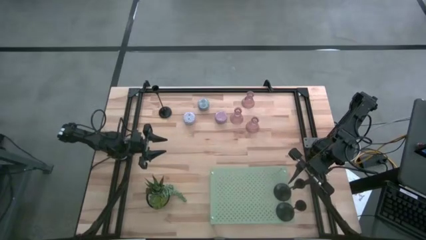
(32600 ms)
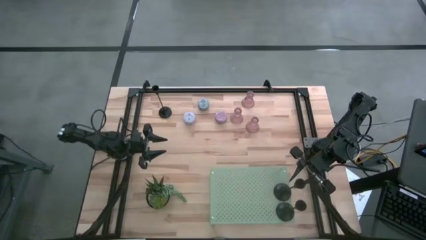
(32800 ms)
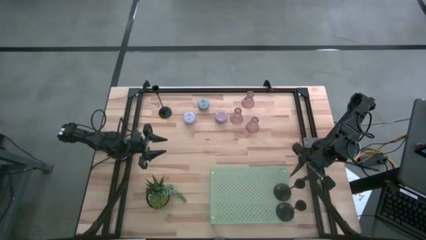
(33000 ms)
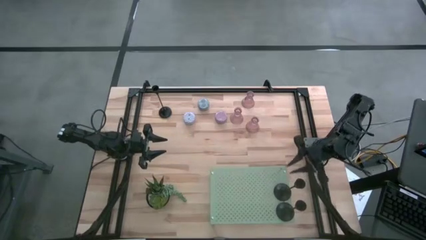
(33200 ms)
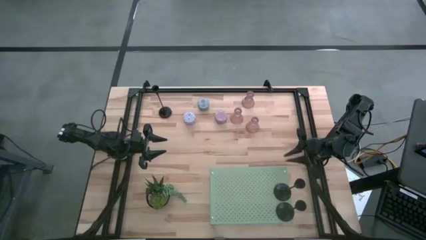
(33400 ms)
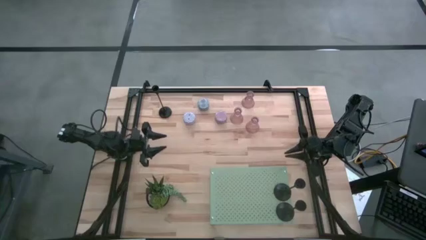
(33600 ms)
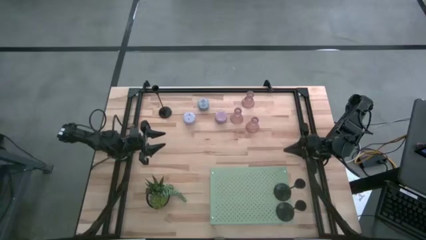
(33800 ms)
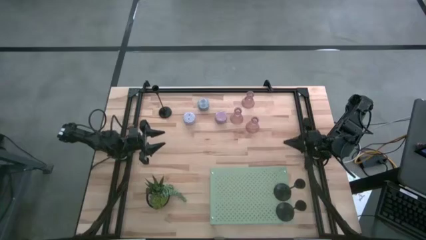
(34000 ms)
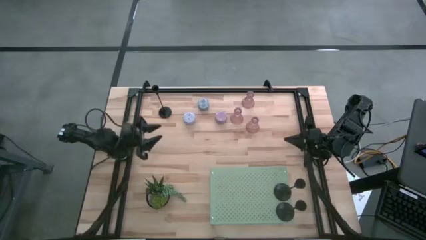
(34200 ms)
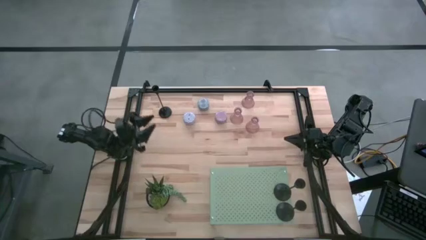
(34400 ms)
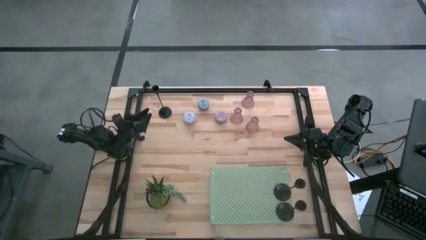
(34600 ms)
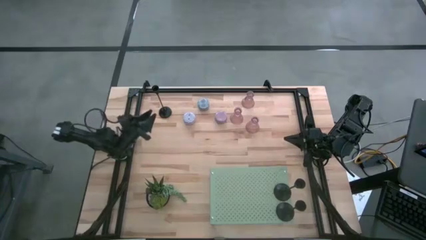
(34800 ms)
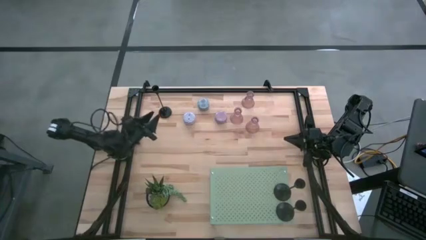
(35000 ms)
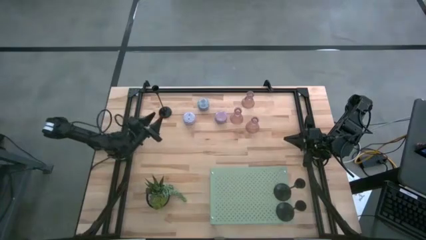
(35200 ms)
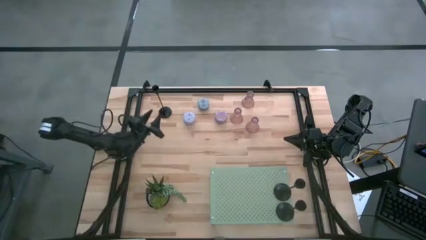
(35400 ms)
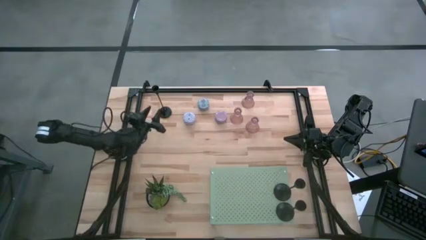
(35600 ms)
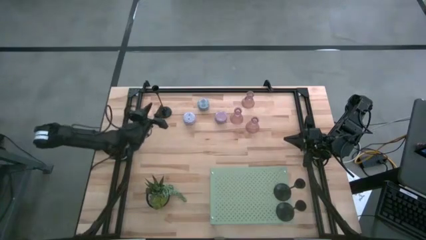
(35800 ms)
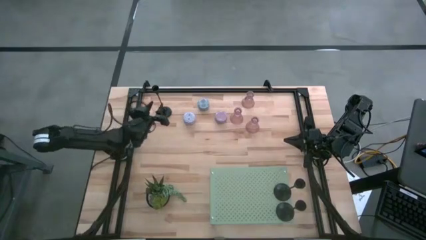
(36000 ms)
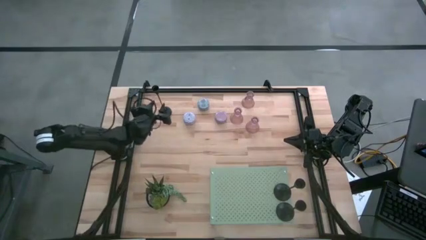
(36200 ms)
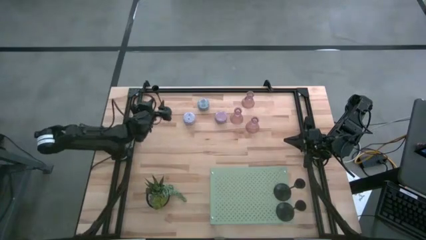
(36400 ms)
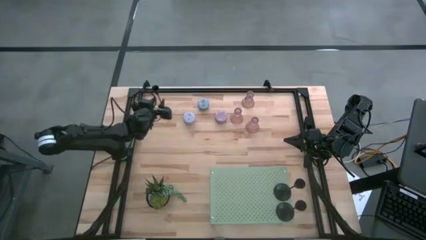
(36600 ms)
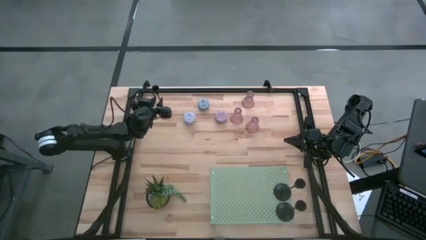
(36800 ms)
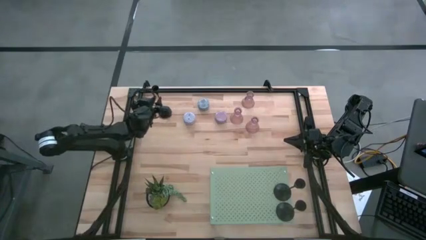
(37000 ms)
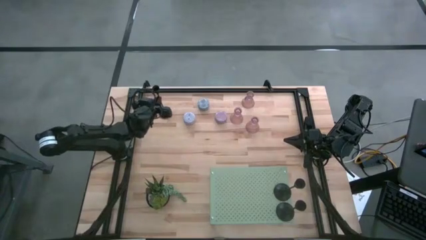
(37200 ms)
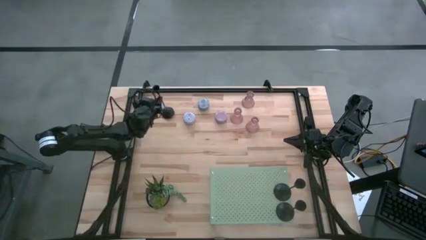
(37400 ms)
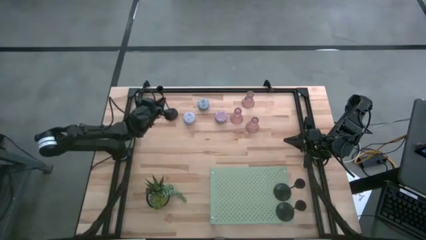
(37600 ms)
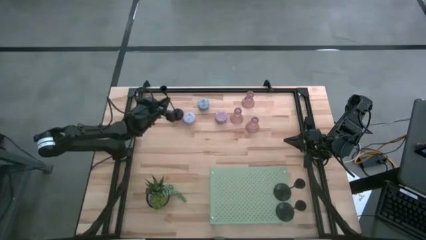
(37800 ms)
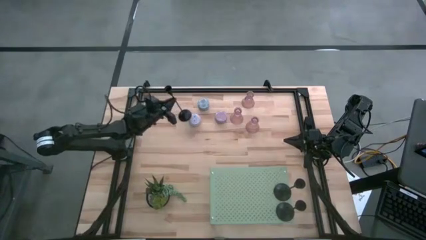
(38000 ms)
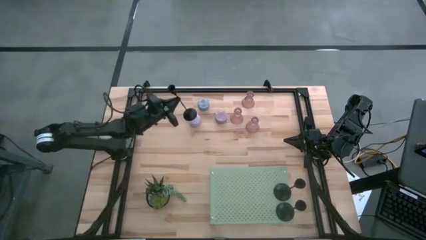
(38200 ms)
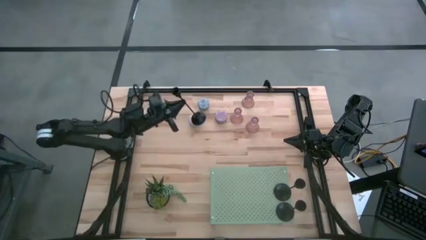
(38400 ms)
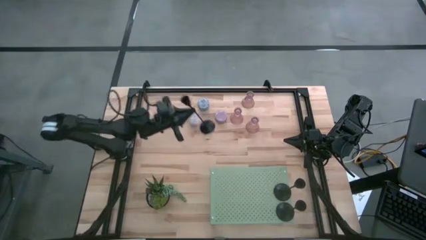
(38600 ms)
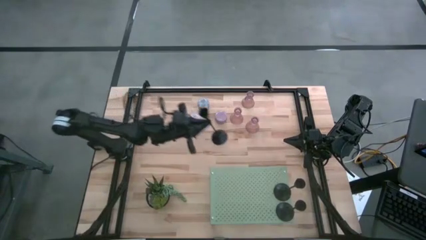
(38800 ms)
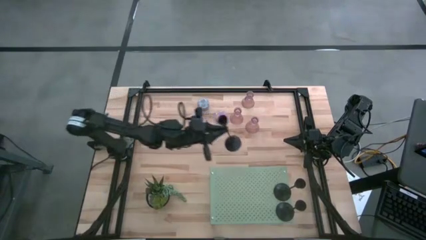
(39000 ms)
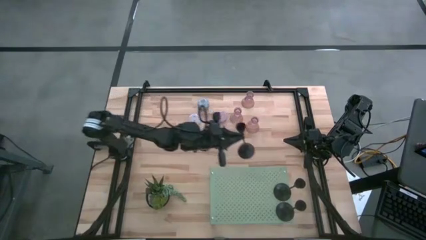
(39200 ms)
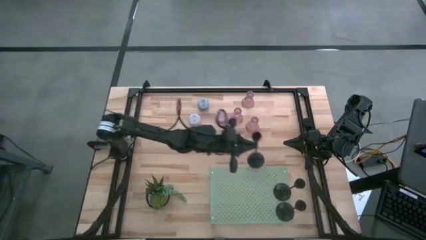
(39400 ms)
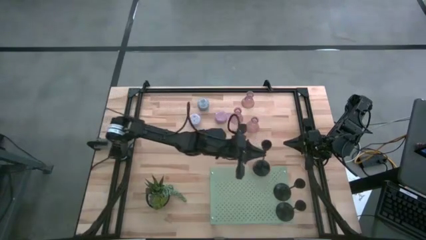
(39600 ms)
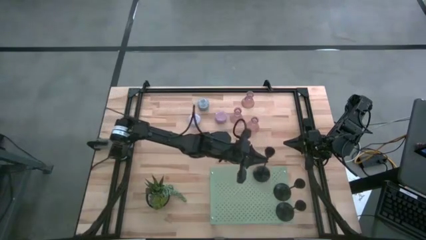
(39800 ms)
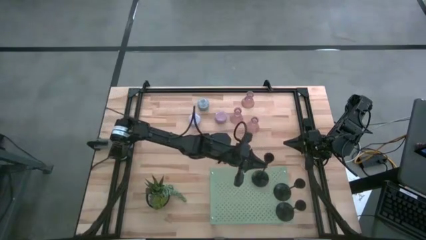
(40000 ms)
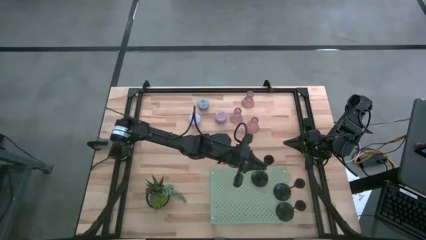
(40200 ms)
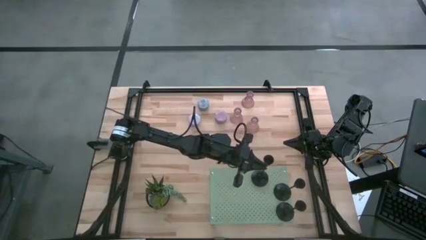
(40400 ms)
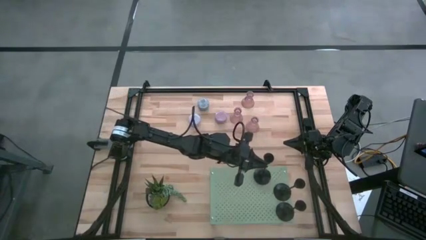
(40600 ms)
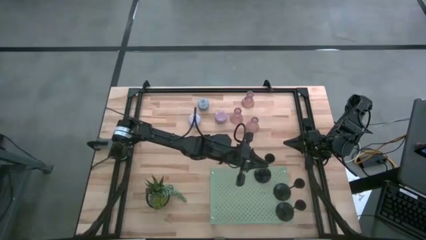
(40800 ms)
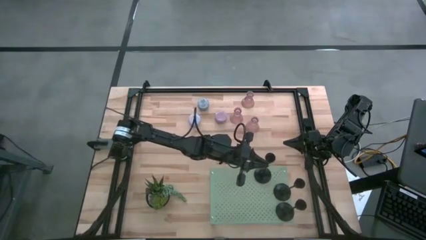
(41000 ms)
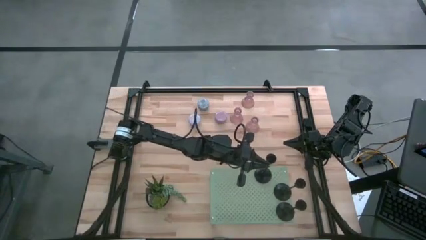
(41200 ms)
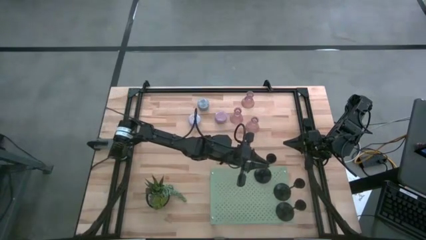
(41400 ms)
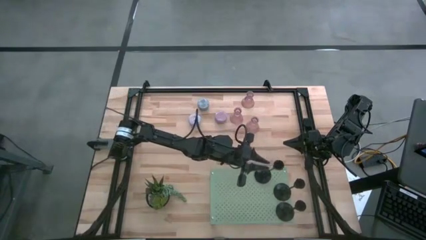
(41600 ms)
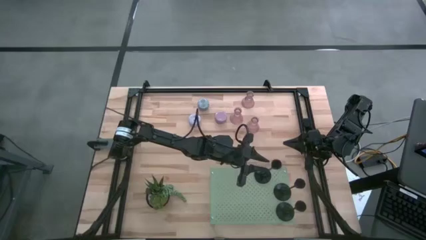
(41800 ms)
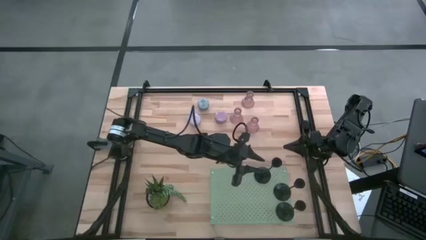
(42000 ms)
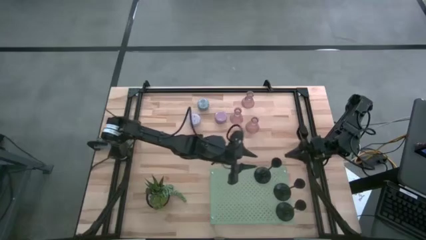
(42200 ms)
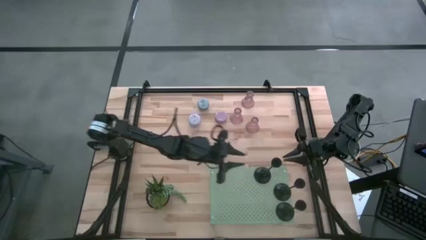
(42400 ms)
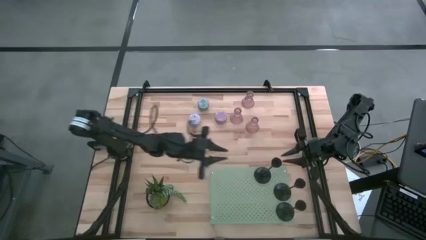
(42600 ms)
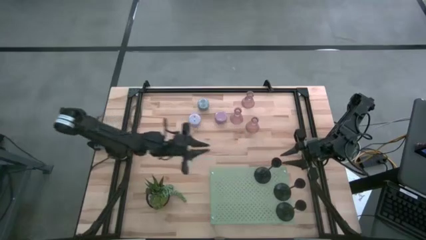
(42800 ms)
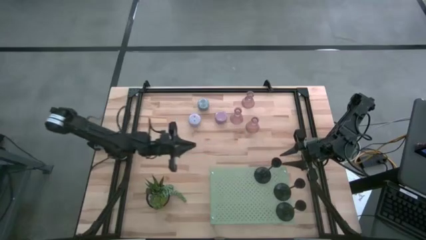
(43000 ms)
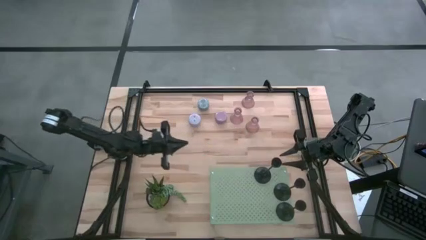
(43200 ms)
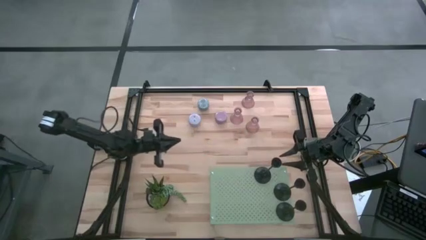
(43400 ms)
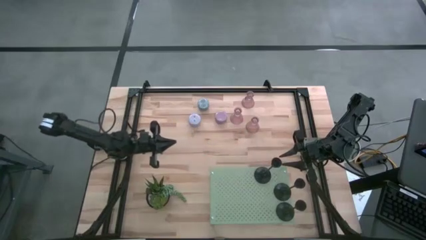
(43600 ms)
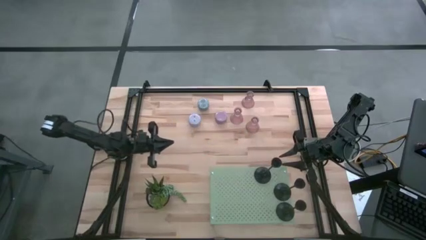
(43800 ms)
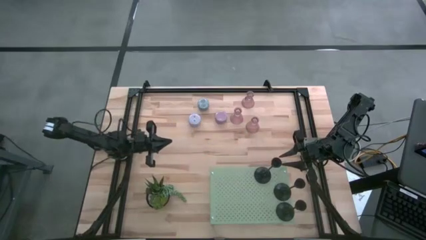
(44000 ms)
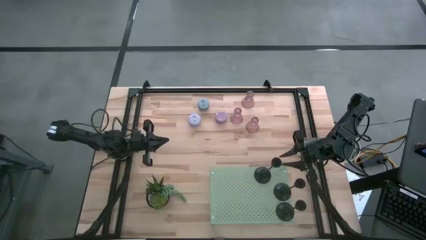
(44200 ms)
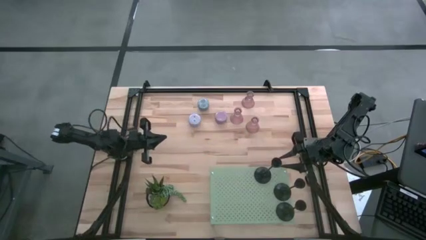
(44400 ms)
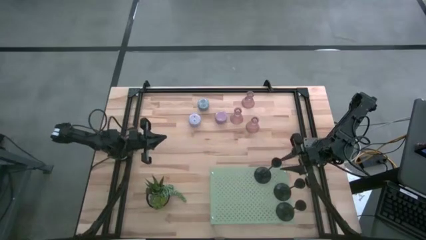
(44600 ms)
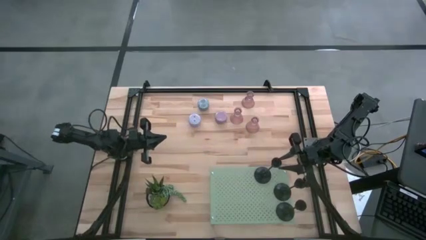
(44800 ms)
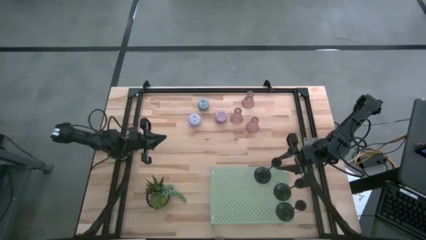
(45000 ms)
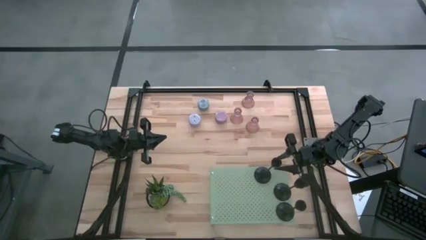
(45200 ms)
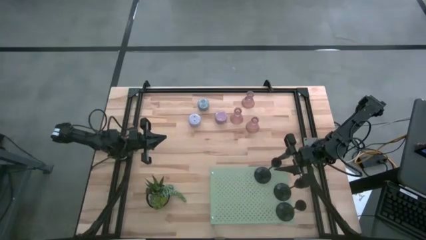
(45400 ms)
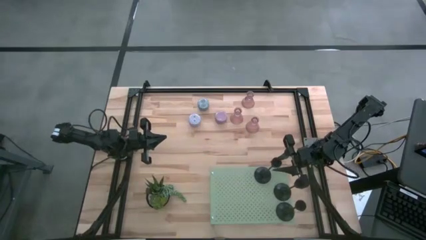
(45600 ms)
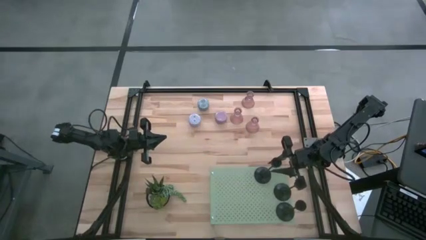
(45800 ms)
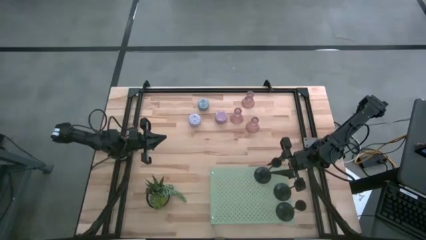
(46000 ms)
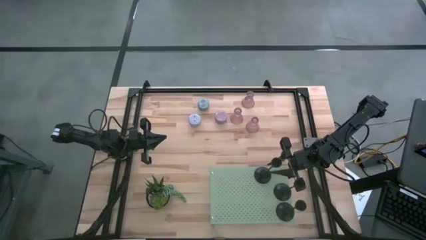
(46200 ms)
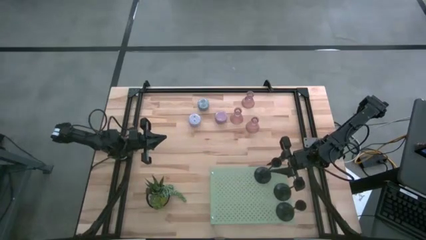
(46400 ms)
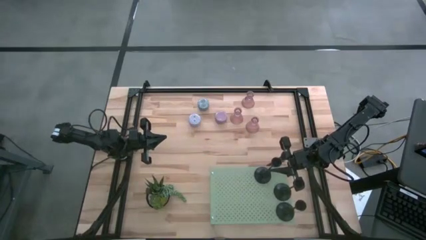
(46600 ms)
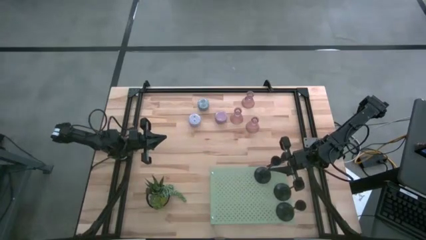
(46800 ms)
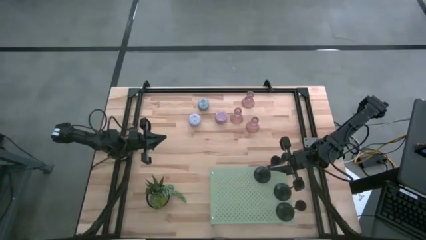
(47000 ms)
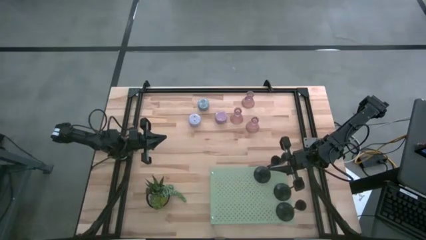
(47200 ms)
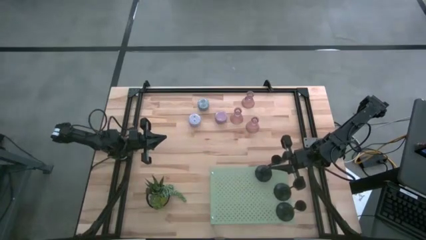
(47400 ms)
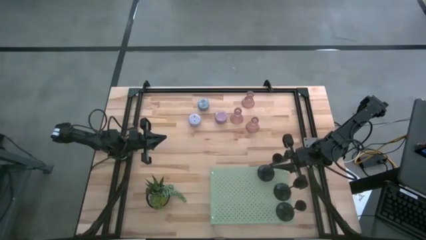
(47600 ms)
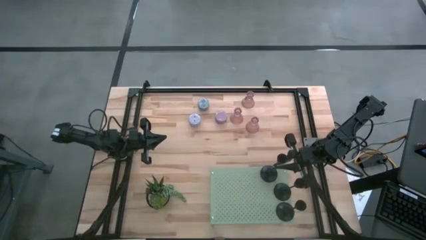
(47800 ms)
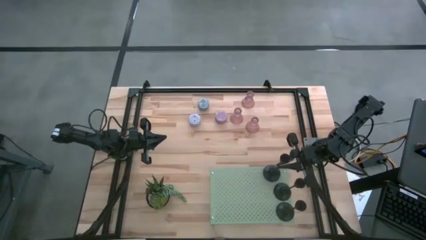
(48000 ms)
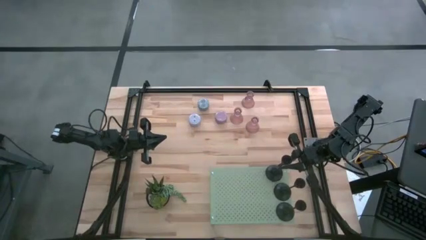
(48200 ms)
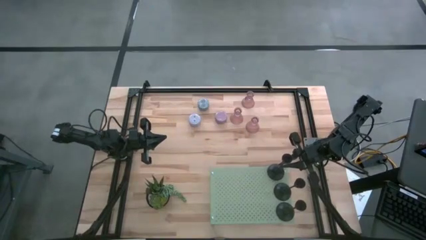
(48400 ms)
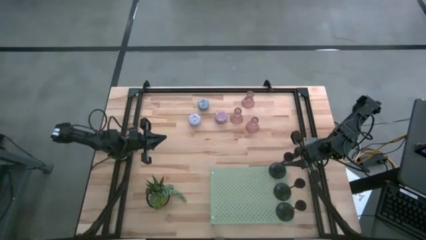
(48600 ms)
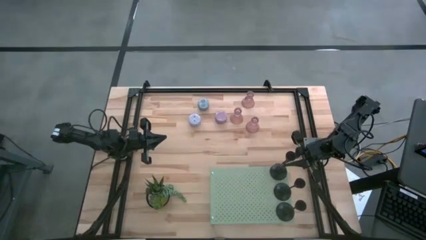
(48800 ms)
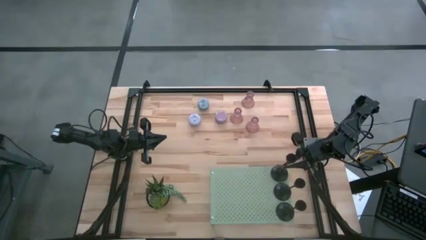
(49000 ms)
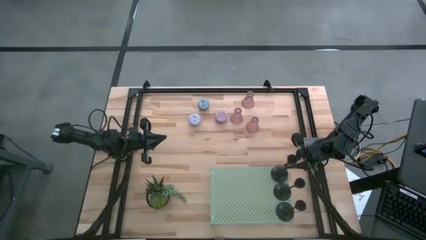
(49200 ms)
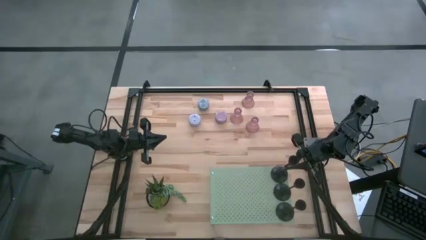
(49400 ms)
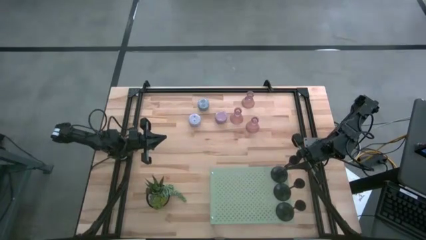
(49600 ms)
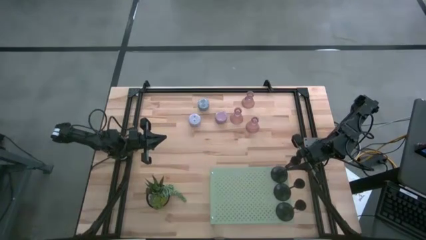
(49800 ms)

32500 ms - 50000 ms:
Task: Pick & Place candle stick holders
Put the left black candle holder on the shelf aligned with the other black candle holder
